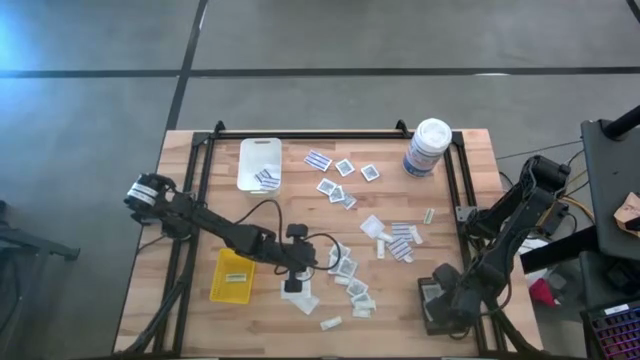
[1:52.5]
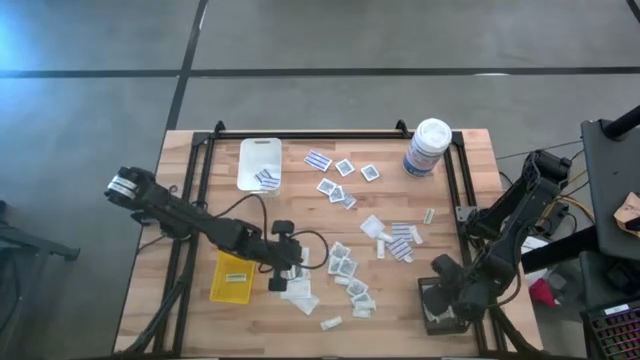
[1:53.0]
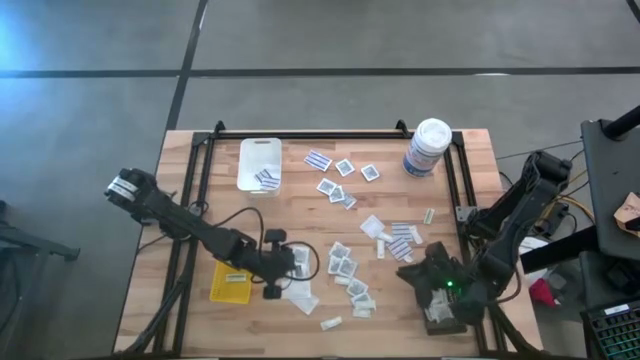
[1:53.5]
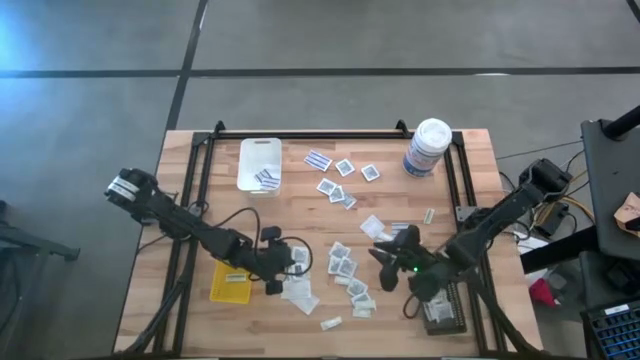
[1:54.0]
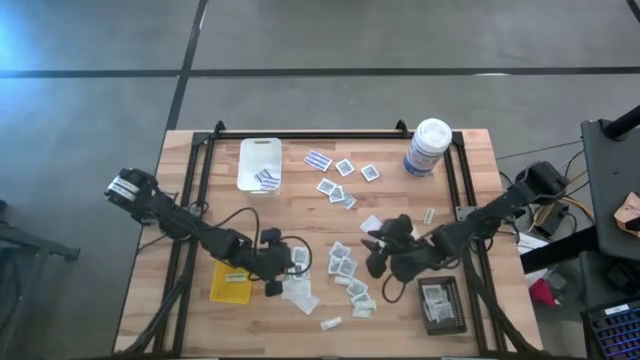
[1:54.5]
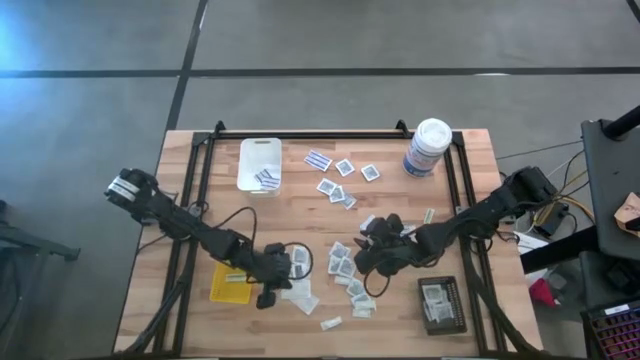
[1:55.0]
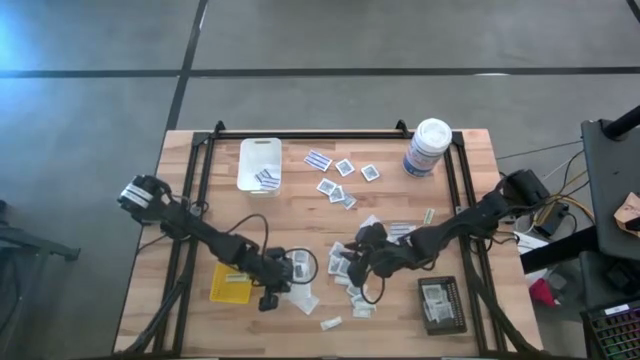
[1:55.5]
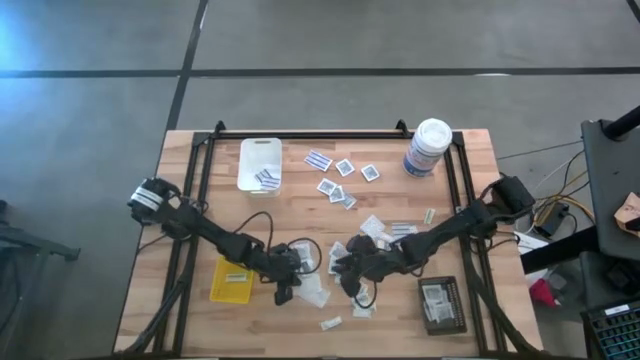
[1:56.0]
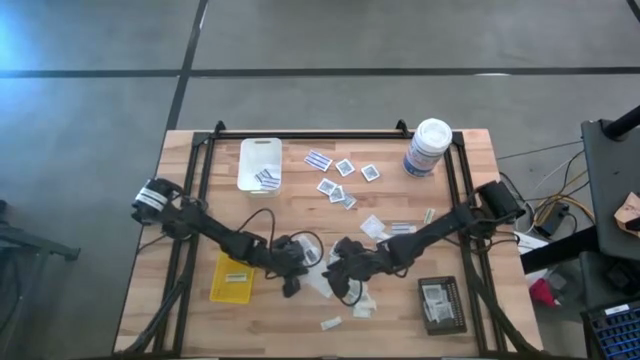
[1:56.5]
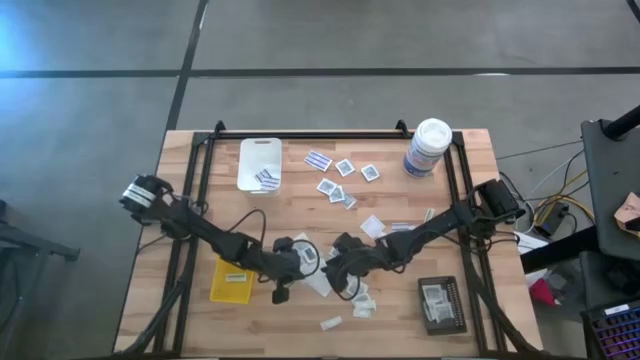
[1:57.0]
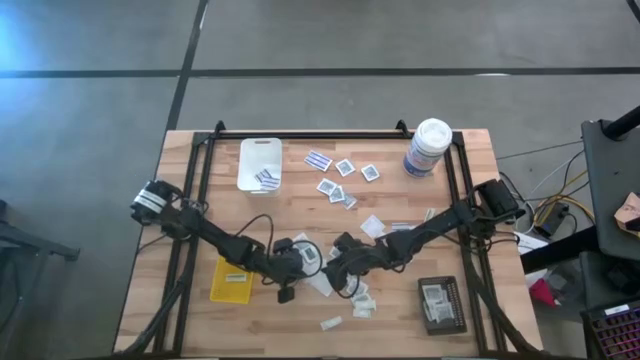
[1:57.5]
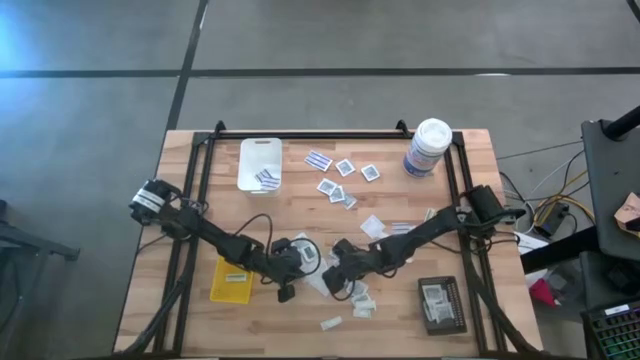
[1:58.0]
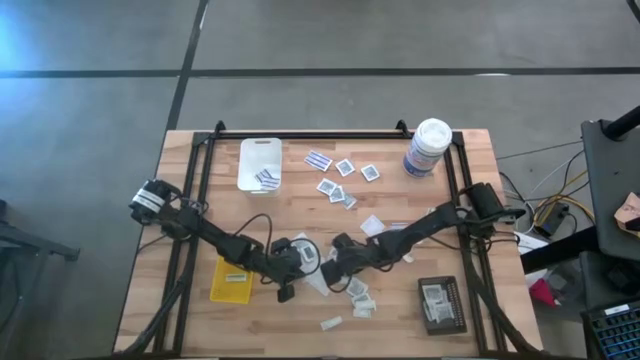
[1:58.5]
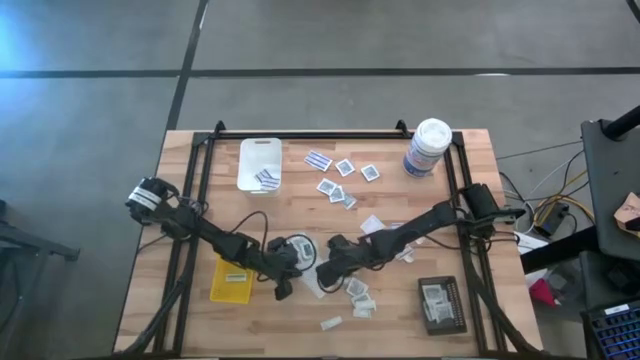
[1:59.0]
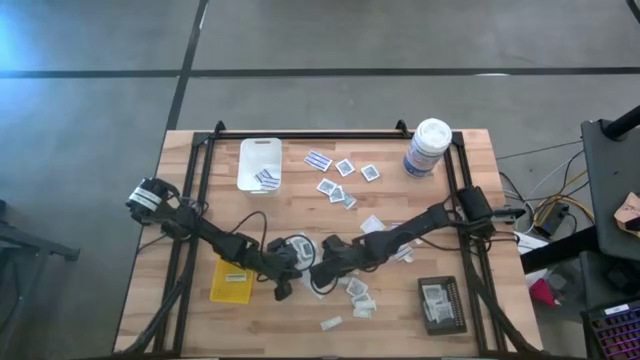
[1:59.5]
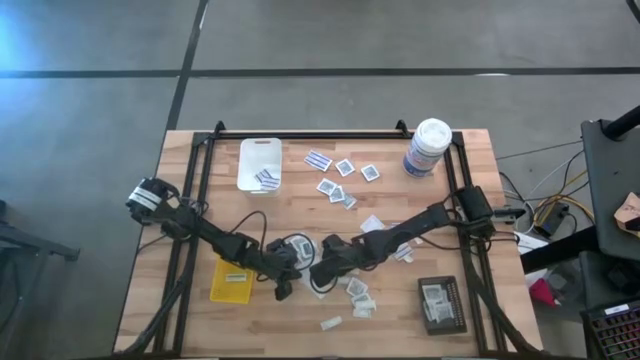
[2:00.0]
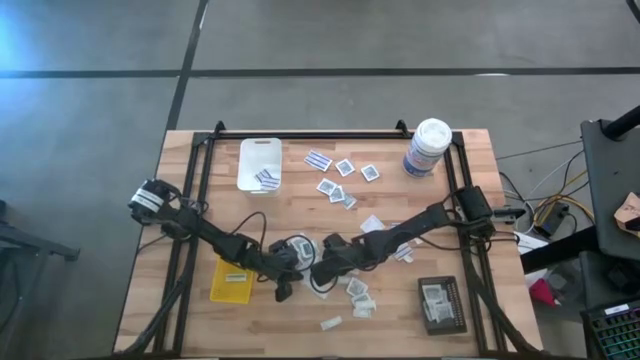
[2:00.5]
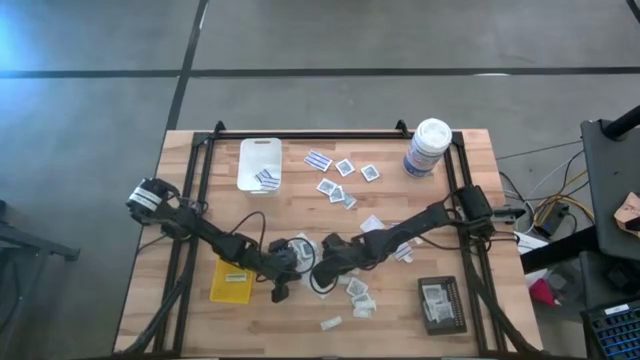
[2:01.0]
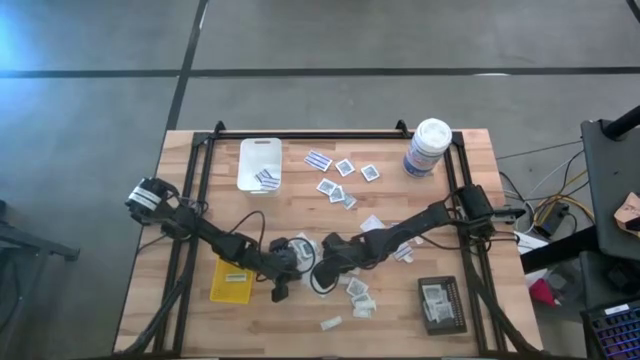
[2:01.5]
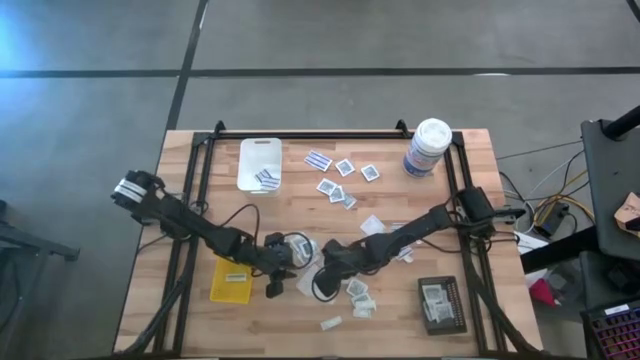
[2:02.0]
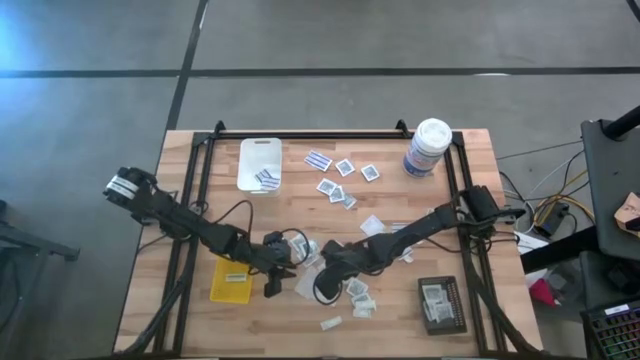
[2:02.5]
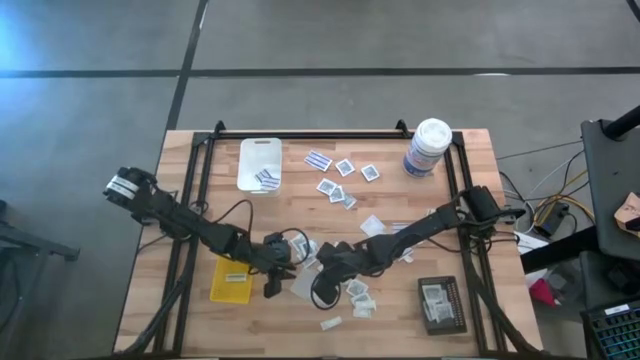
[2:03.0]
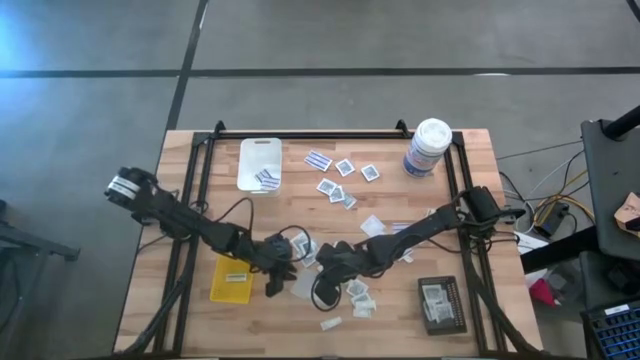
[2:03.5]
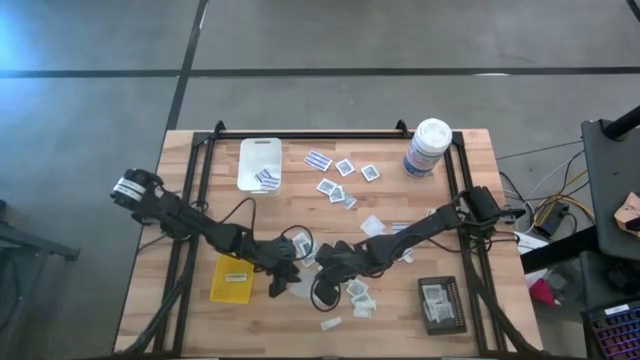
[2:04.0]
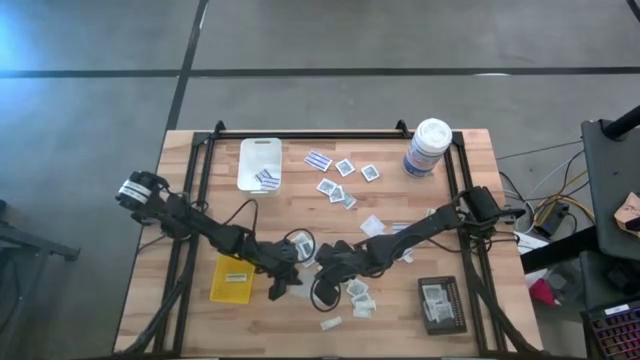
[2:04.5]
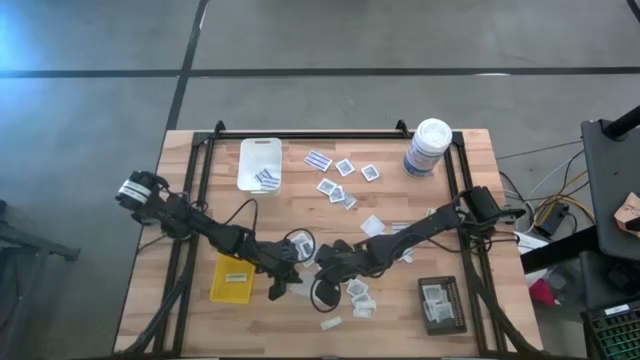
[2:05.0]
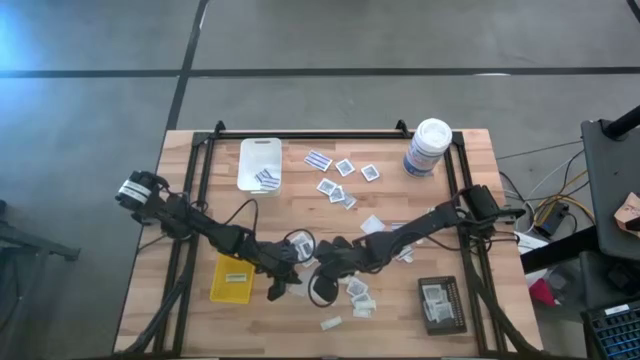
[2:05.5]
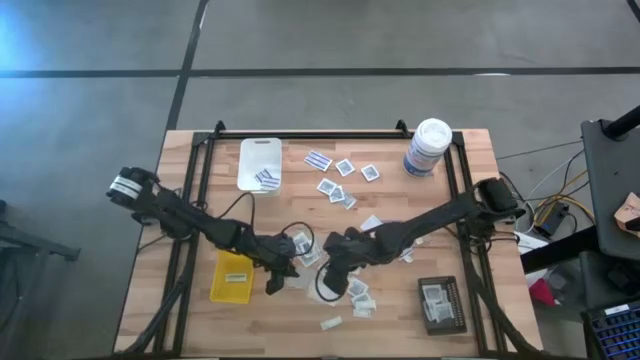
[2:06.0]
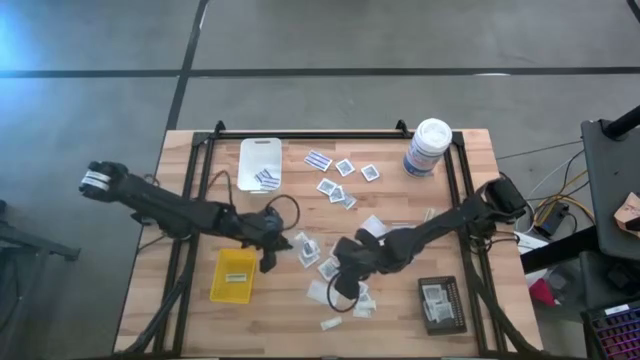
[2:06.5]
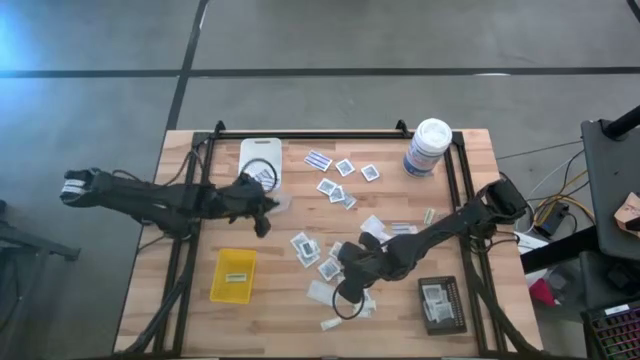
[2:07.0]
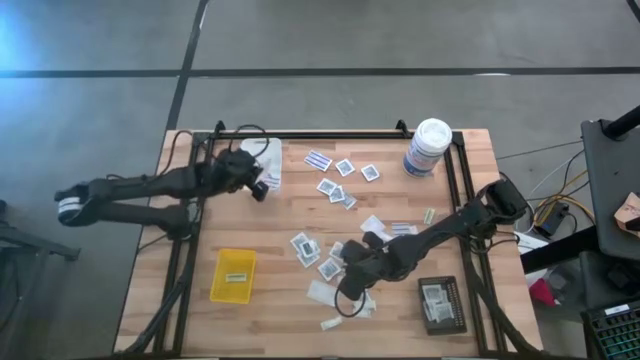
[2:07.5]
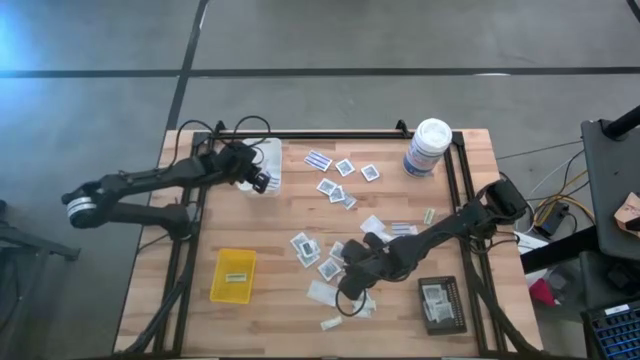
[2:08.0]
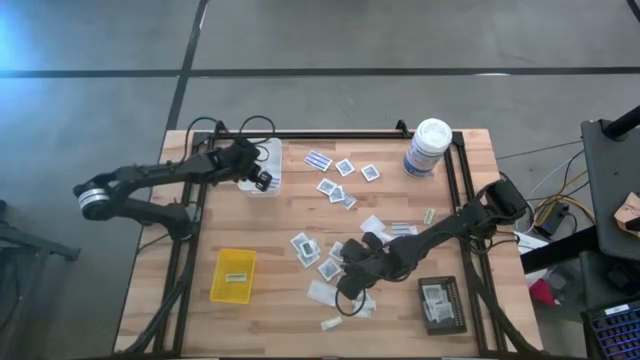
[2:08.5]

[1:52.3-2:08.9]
Task: Pick & Place First Aid Supplies
Put the blue bandage into the white bin

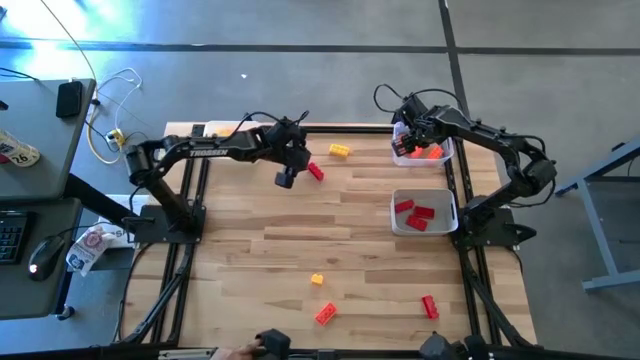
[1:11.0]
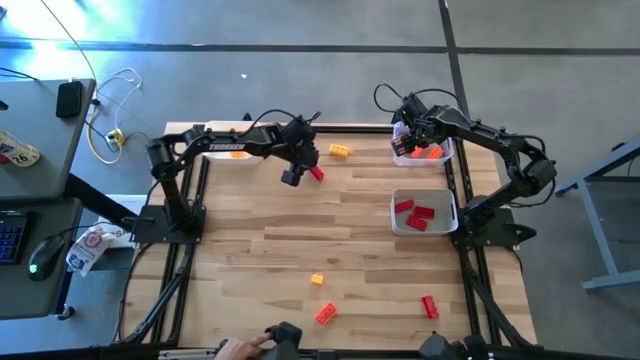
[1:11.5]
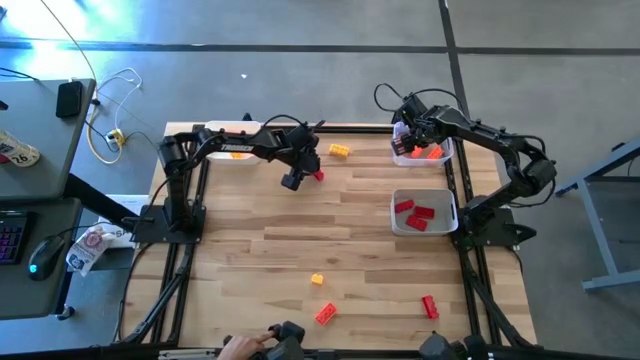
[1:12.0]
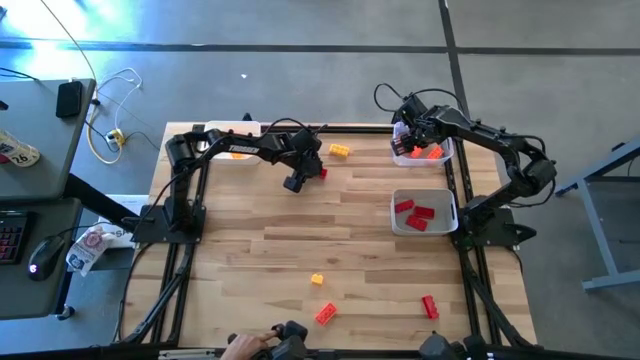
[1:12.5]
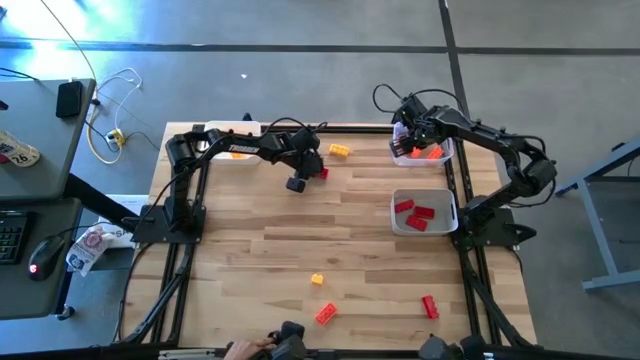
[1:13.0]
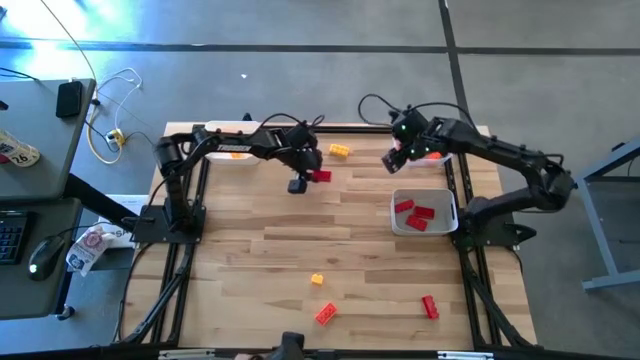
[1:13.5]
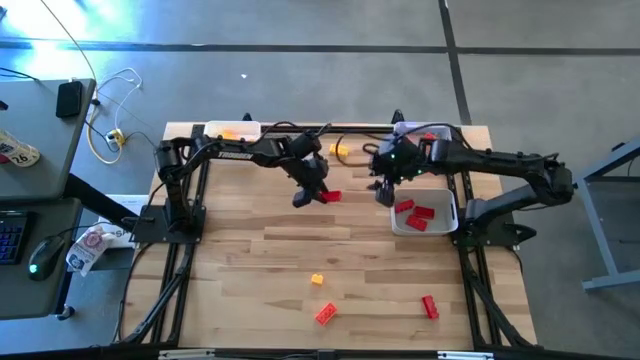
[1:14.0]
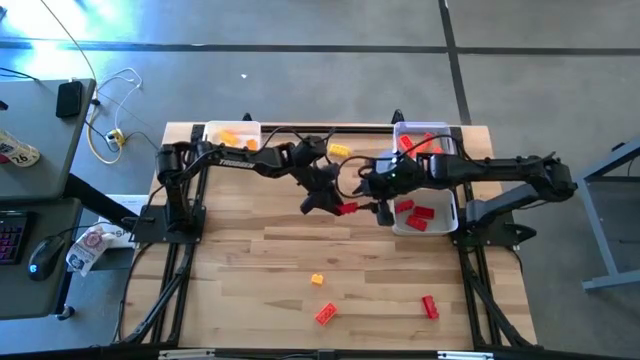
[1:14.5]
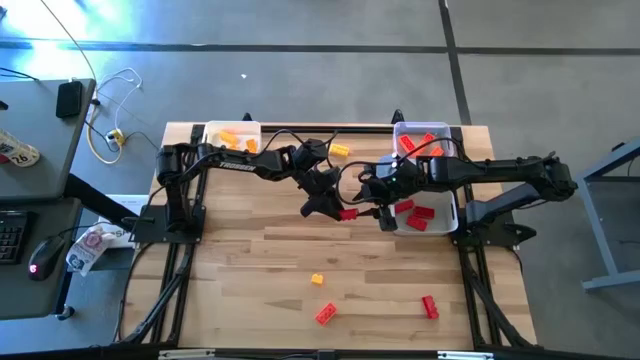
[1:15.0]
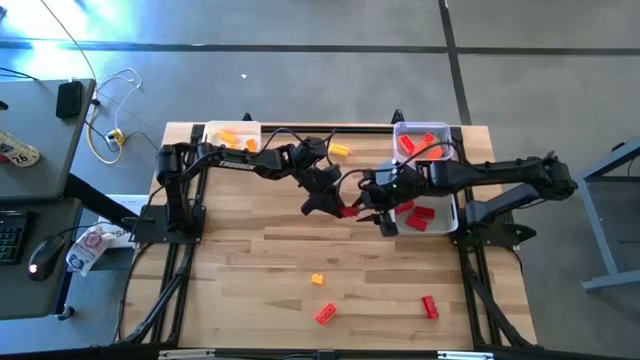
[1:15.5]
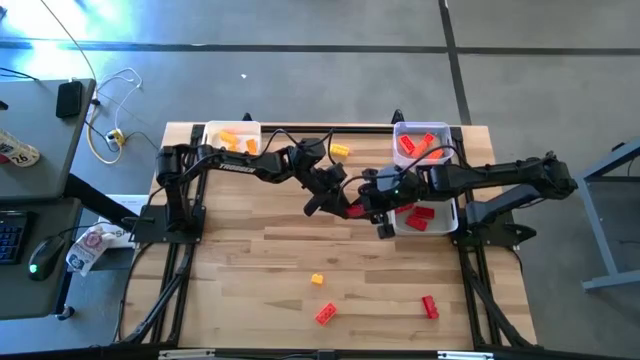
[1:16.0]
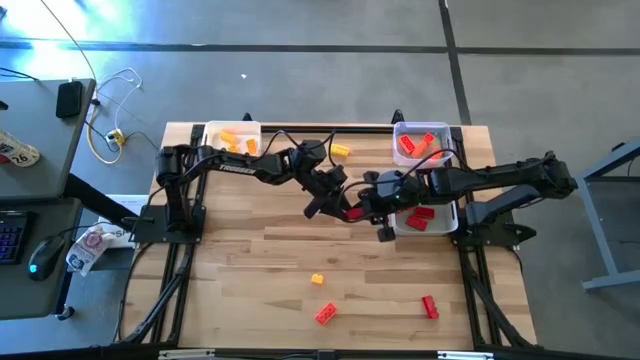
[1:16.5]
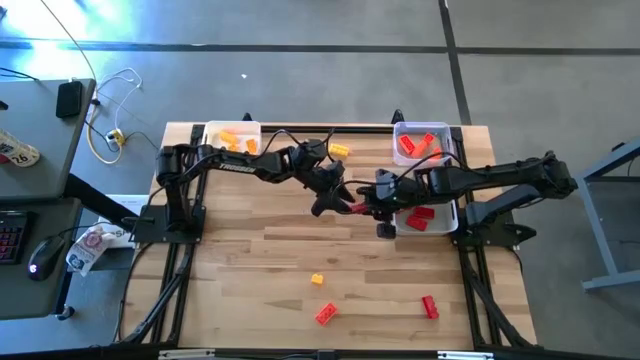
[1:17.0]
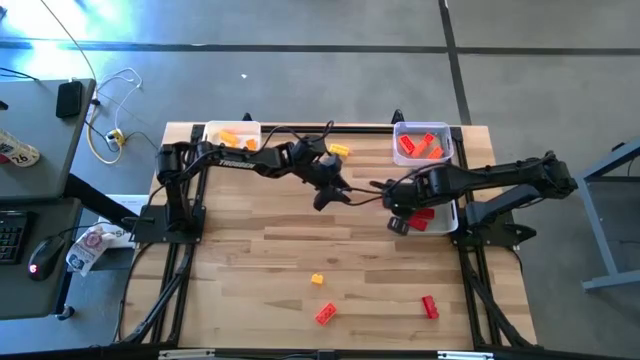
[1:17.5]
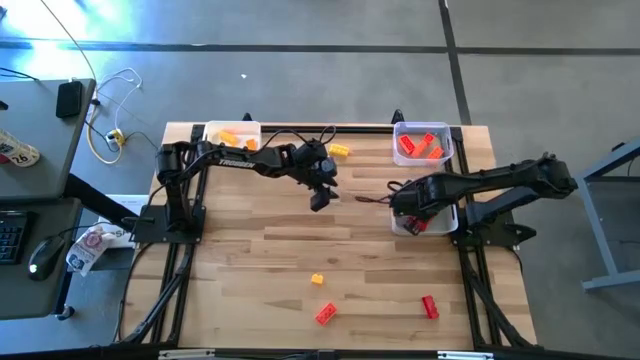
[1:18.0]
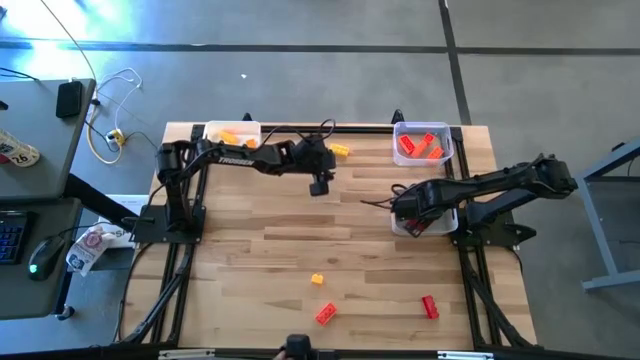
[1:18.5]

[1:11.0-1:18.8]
Task: Sort & place blocks by color
Put the red game piece into the gray bin
